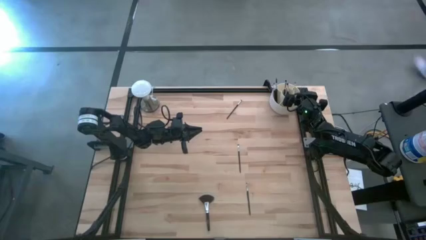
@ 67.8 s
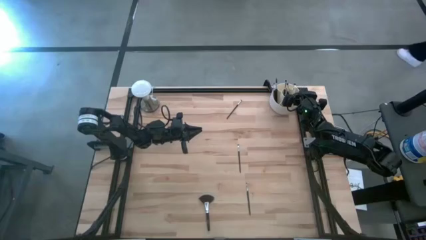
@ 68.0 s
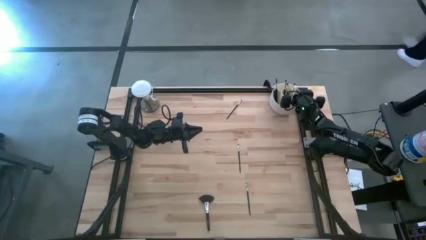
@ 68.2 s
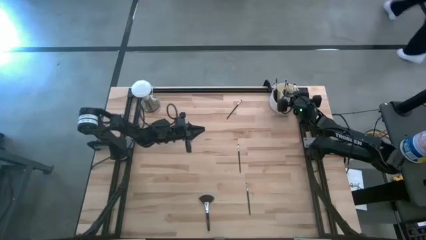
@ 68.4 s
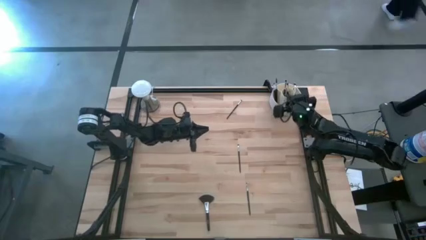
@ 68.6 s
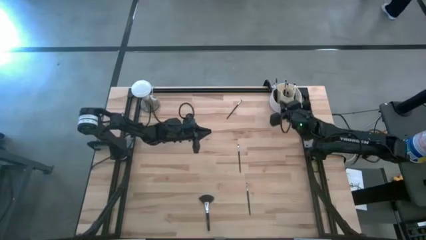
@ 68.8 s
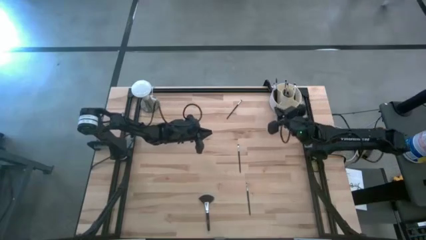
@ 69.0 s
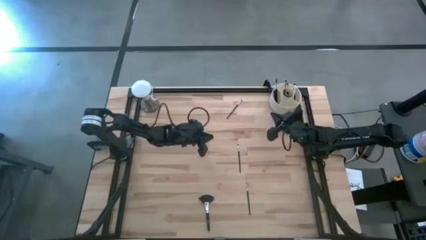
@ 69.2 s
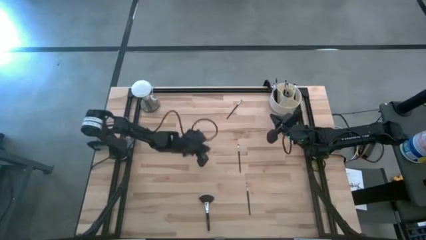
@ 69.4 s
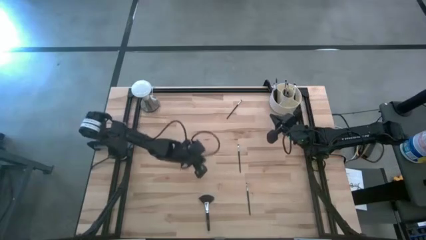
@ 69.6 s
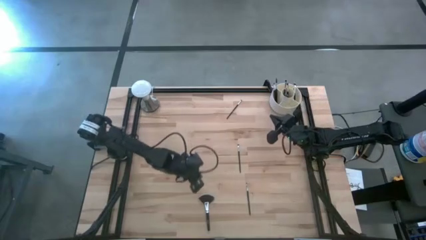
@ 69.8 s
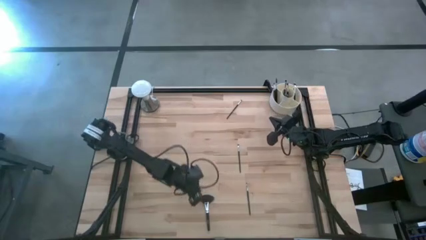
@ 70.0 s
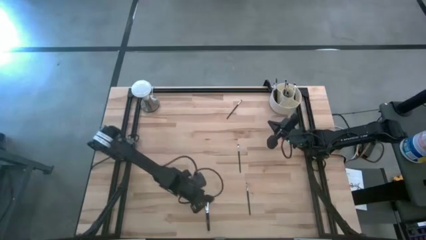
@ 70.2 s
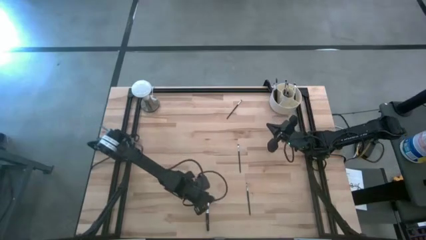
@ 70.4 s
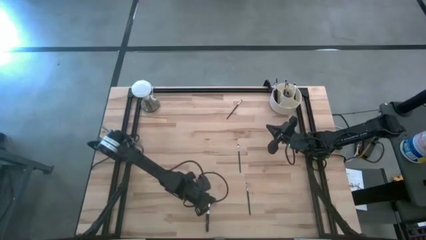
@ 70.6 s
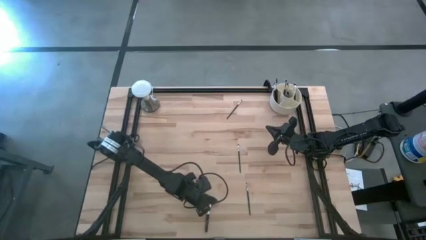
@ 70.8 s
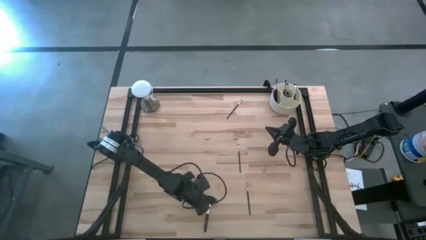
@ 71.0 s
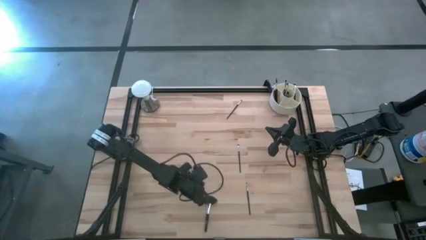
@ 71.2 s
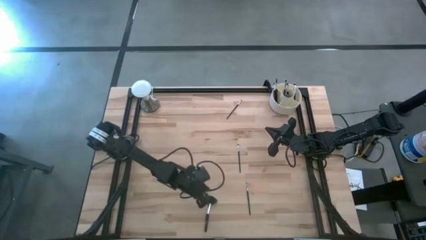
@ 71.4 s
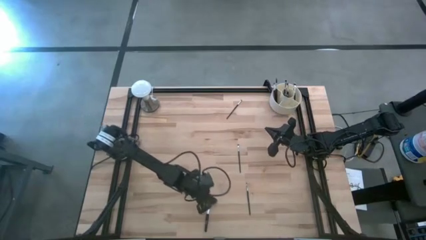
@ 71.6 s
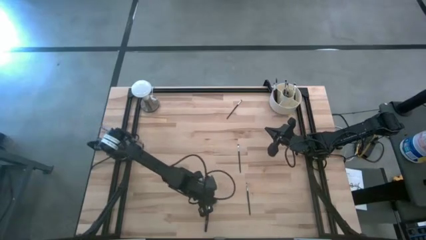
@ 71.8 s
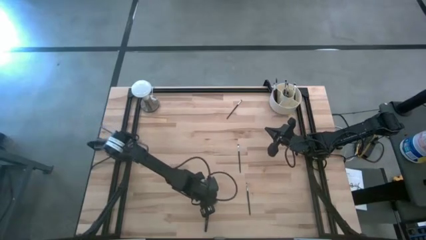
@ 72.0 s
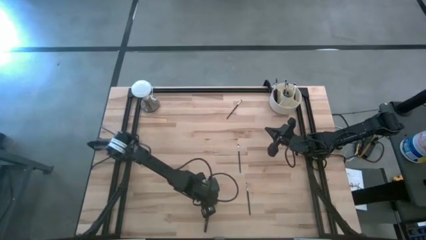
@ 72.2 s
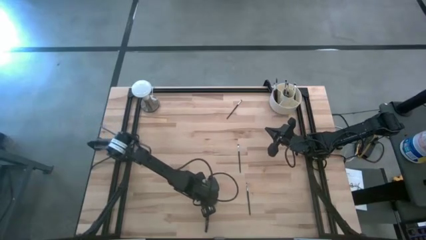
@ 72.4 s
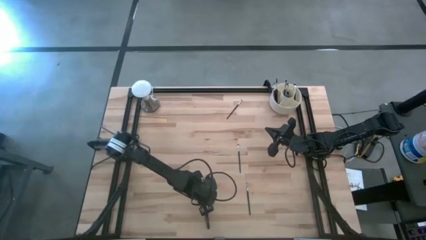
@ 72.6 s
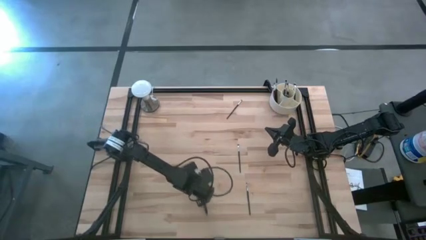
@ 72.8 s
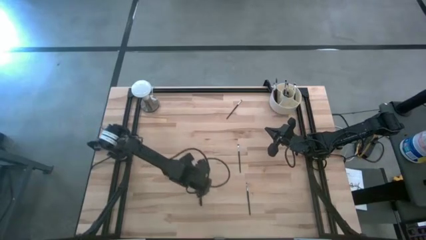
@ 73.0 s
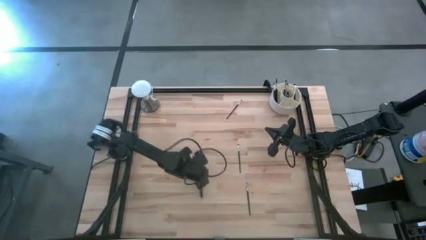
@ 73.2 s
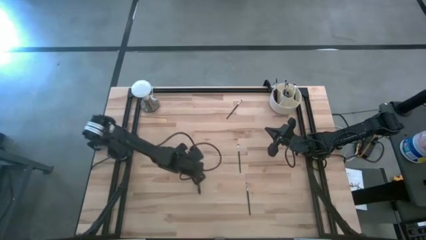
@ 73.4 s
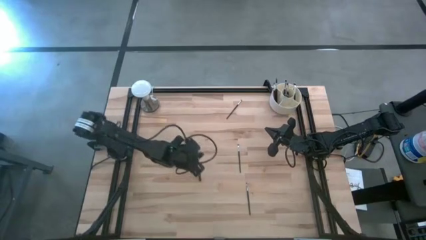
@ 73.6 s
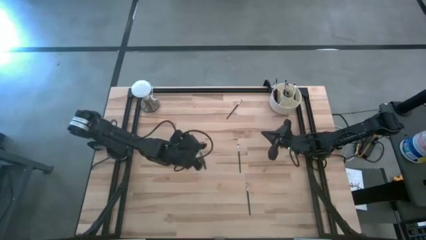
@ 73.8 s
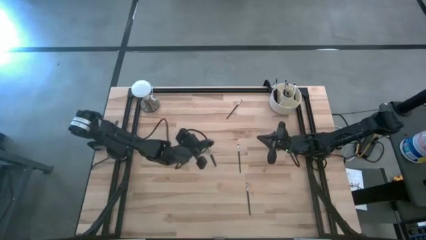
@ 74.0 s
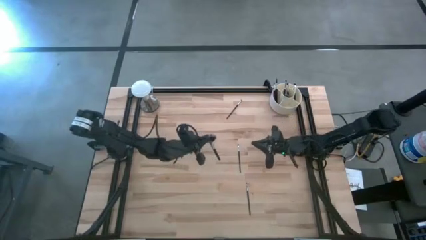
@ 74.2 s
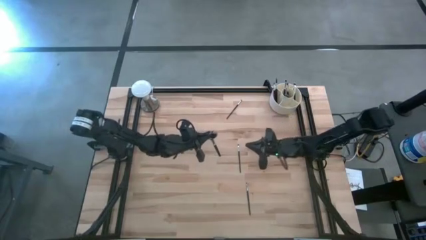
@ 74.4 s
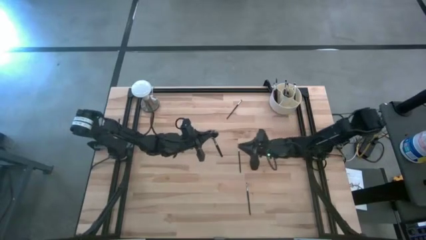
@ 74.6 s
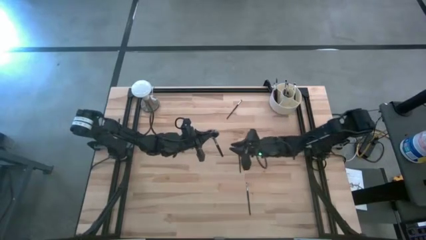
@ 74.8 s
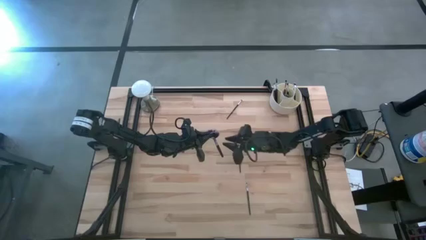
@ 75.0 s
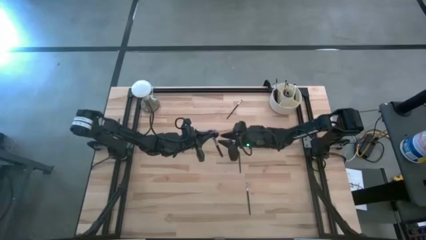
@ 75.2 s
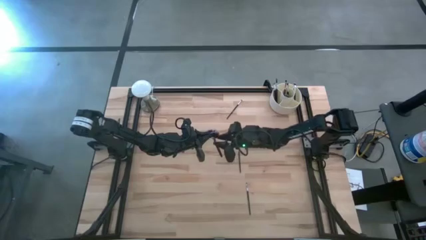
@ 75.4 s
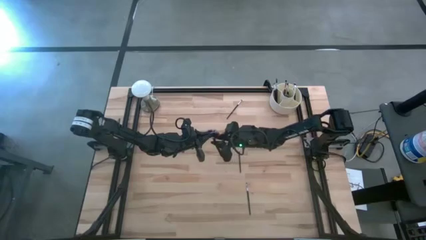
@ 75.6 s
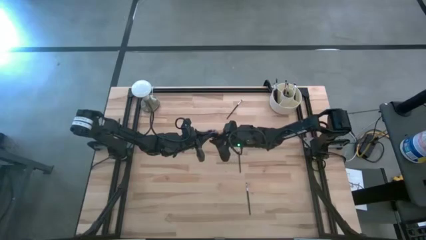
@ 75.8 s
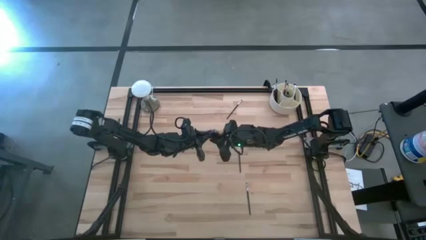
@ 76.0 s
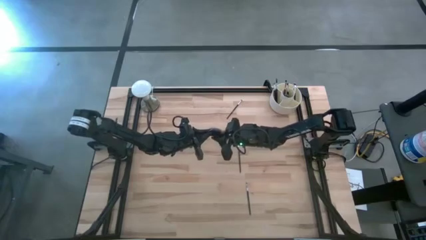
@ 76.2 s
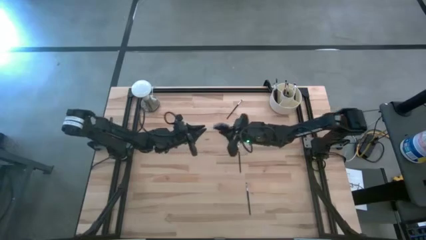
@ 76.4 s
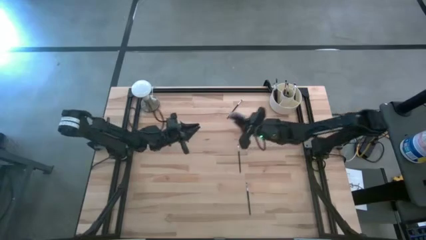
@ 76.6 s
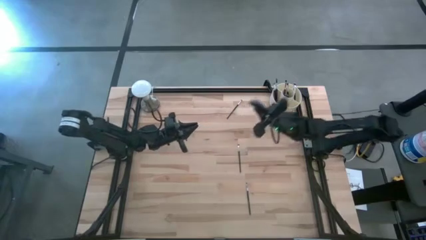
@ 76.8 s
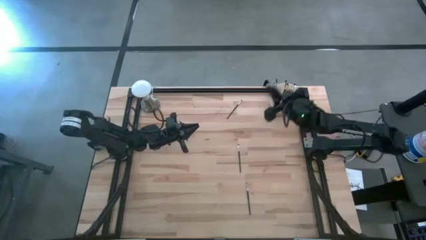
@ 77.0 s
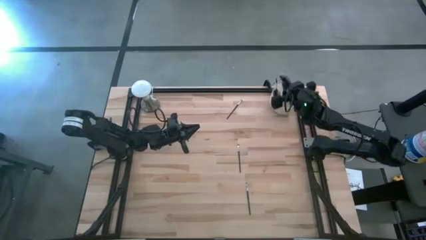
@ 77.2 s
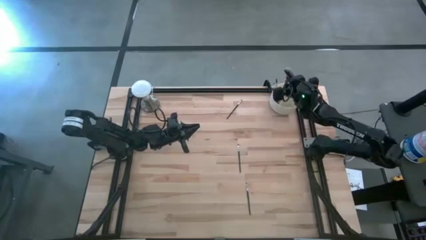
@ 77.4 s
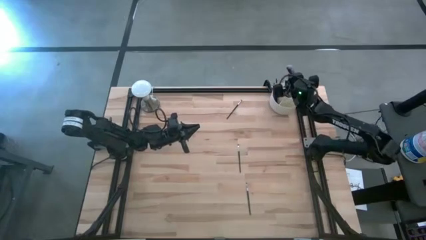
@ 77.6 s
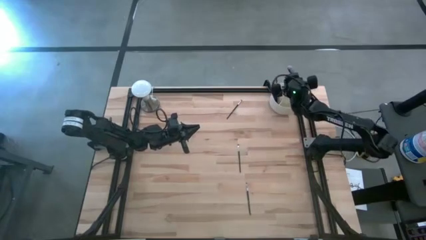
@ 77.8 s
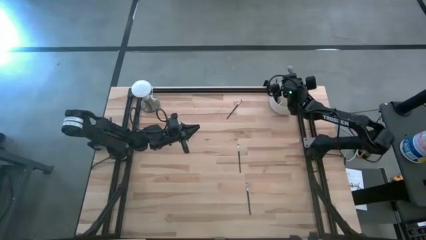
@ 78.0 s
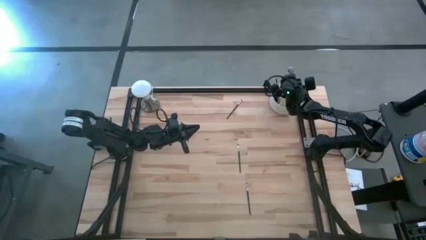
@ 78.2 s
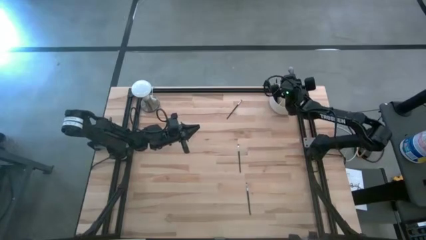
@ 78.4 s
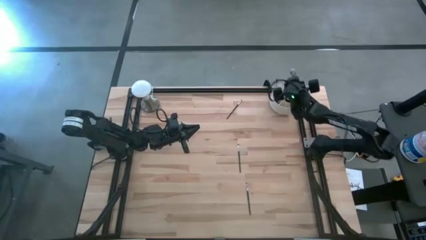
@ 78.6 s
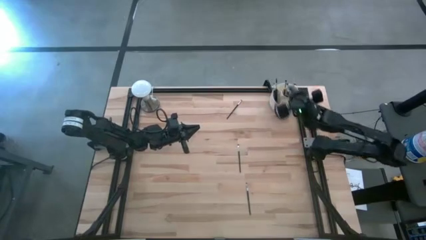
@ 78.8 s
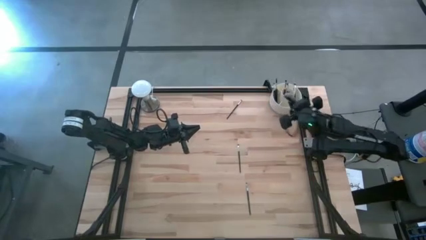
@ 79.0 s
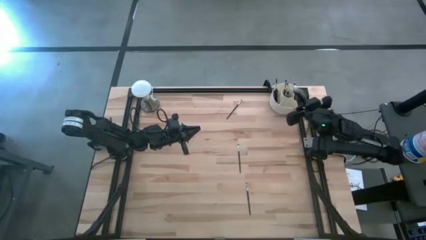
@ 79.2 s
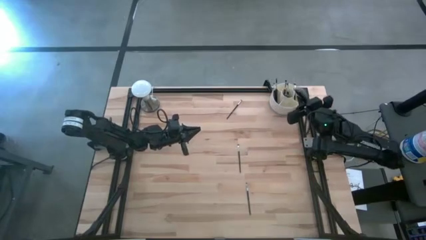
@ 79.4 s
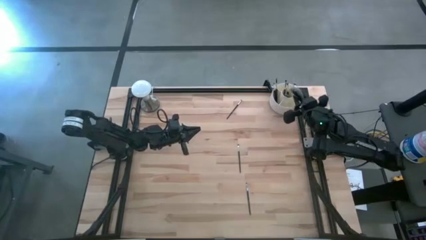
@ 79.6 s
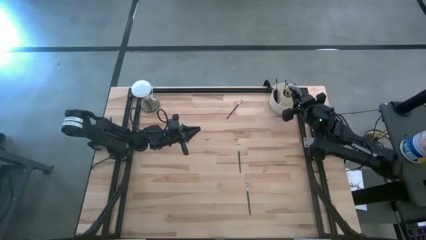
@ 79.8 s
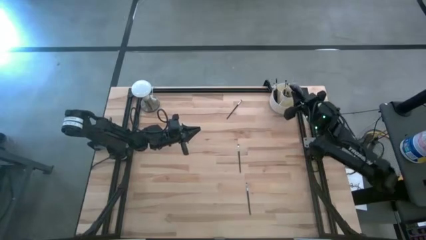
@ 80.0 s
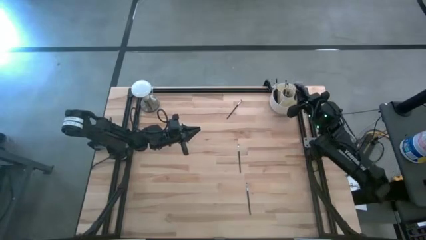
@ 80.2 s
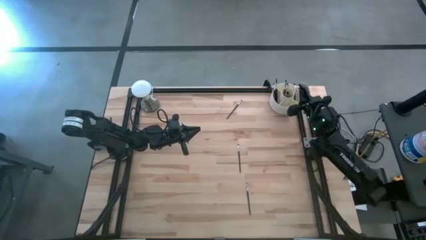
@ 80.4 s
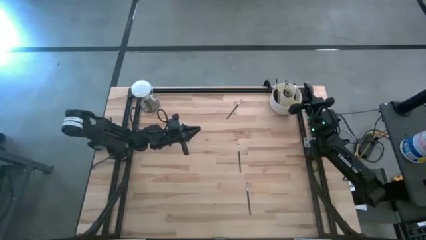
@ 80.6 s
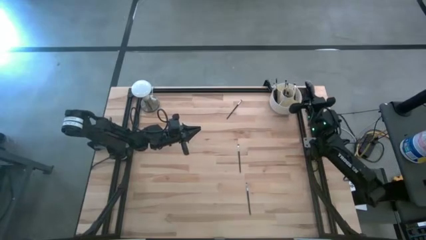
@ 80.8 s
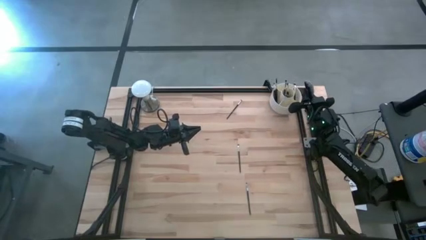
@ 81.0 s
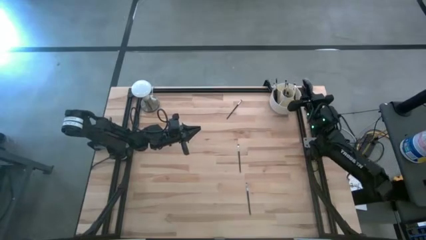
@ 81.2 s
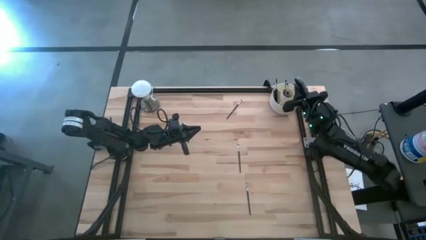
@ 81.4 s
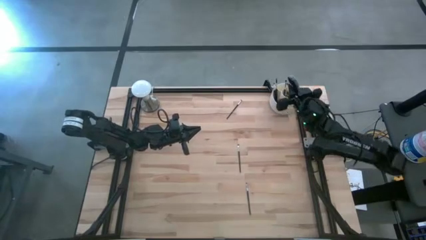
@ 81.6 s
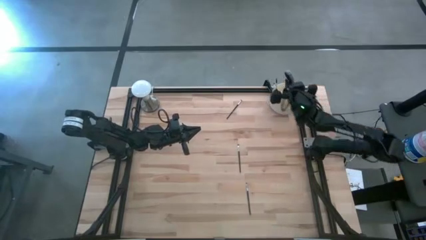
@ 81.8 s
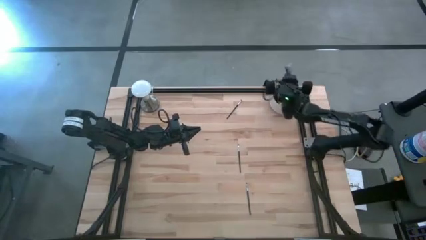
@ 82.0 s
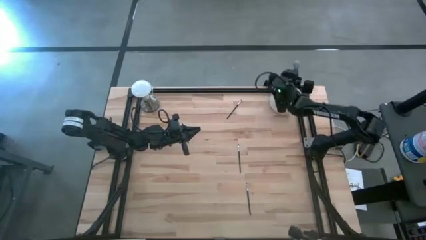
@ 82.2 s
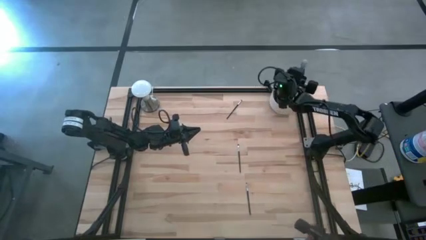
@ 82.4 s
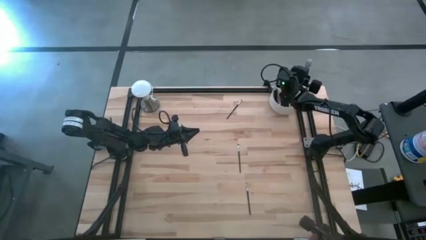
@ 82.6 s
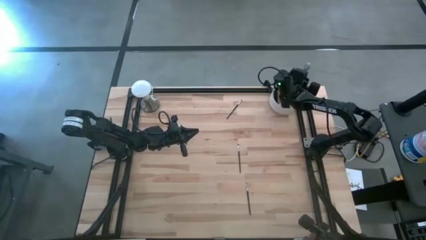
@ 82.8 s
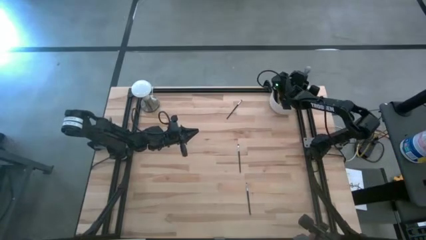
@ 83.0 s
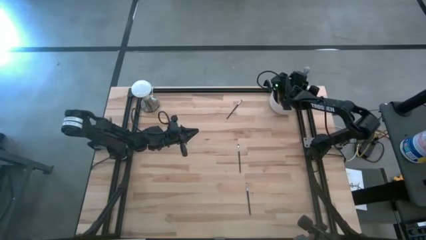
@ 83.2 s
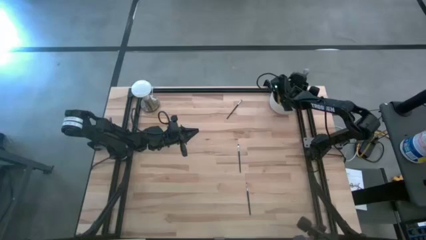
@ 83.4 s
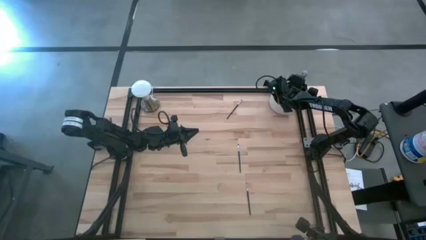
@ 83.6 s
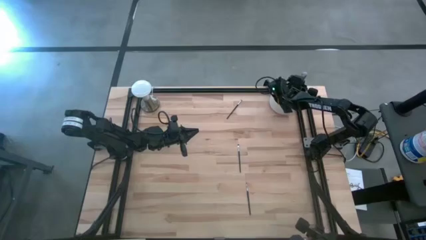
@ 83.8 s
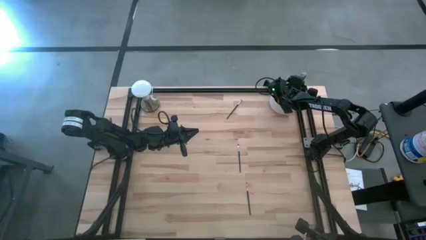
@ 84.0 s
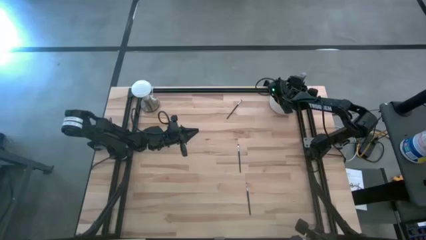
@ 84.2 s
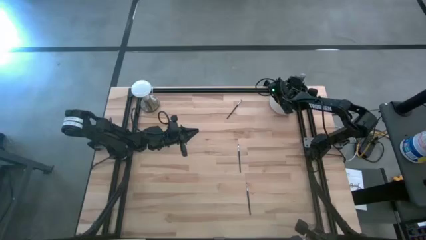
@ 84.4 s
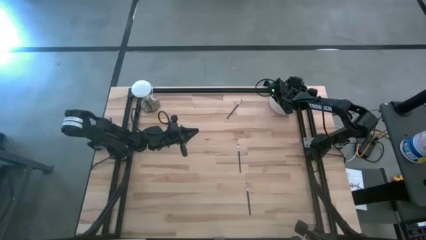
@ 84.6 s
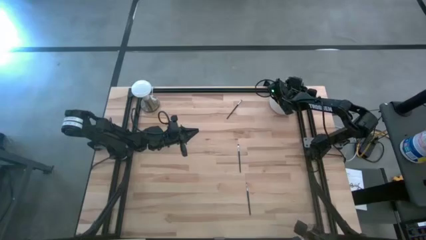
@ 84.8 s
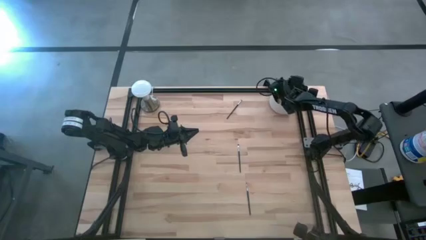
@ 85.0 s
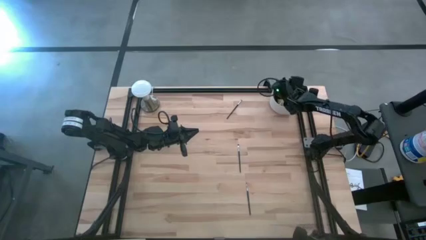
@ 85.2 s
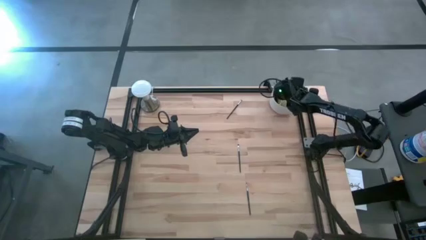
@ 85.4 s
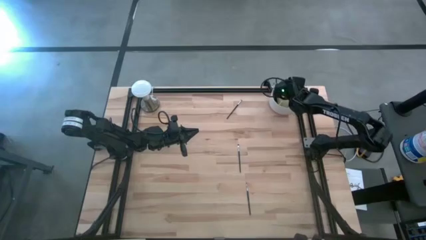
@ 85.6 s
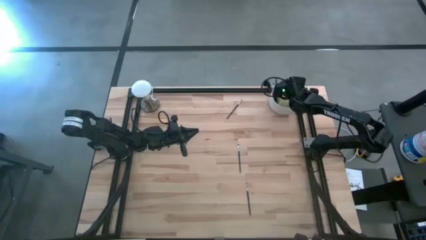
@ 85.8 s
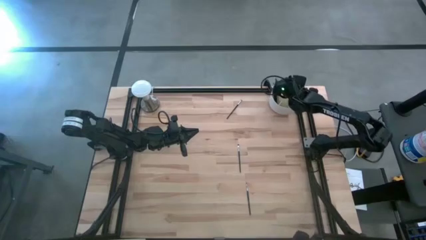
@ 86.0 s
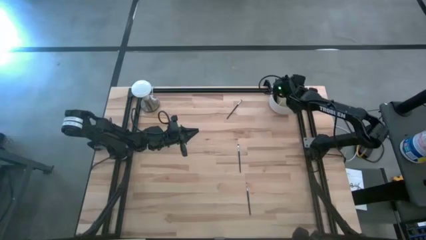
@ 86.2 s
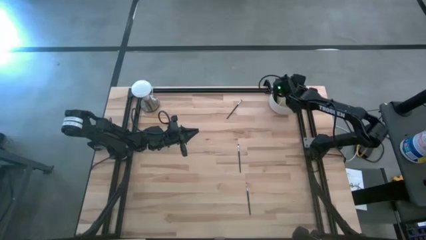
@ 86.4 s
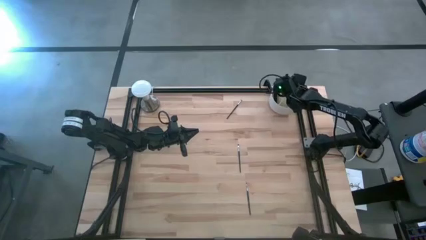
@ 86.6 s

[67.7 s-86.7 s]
Task: Pick & Place Makeup Brushes
Put the black highlighter brush into the white makeup holder
